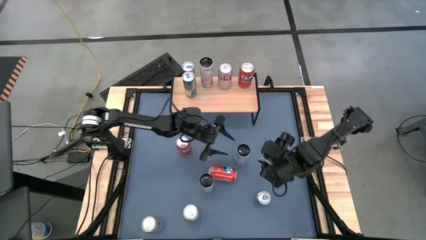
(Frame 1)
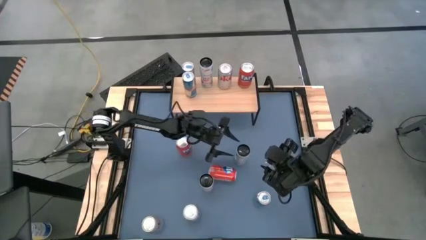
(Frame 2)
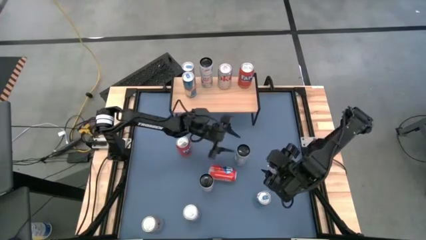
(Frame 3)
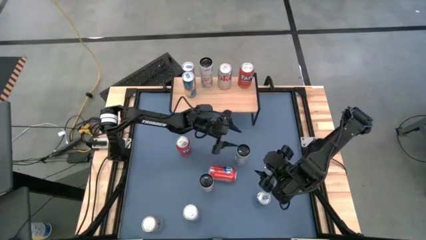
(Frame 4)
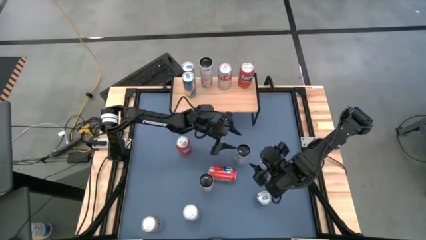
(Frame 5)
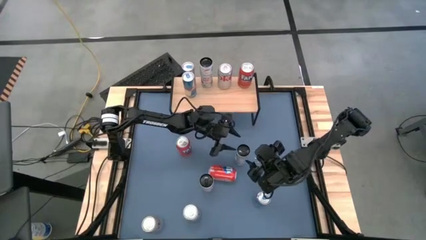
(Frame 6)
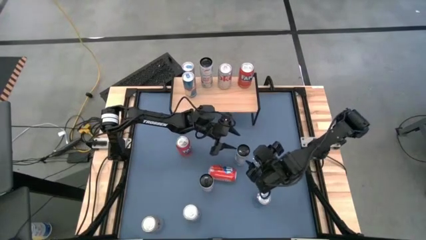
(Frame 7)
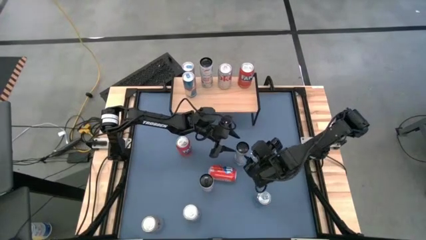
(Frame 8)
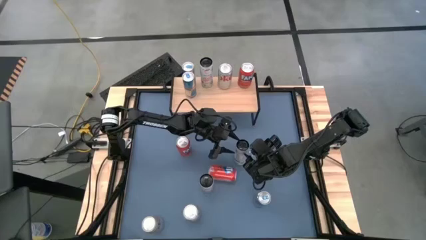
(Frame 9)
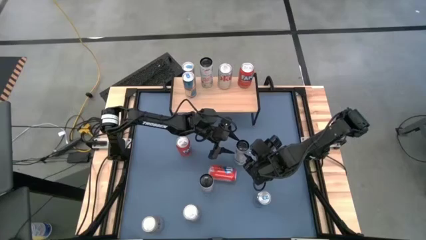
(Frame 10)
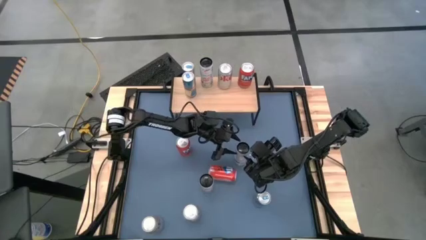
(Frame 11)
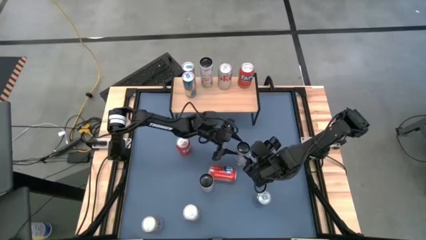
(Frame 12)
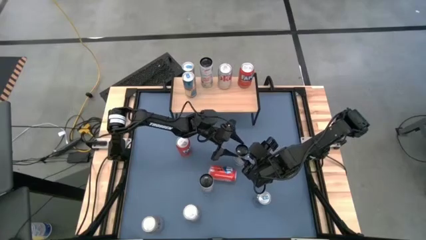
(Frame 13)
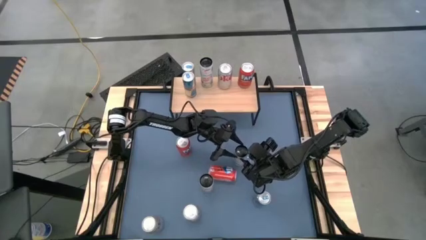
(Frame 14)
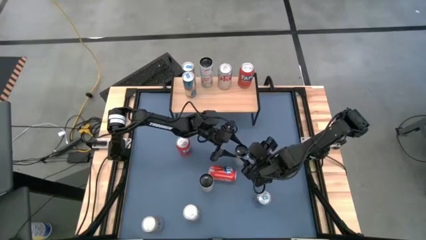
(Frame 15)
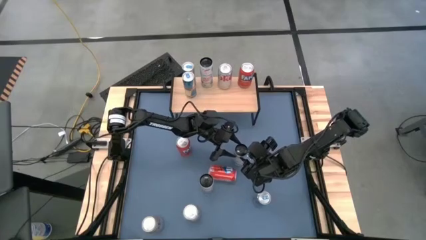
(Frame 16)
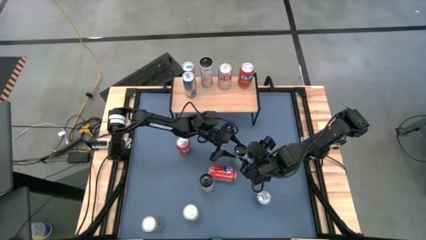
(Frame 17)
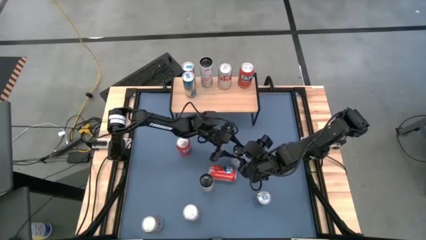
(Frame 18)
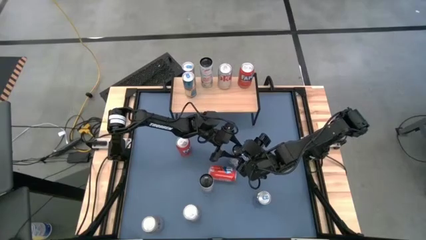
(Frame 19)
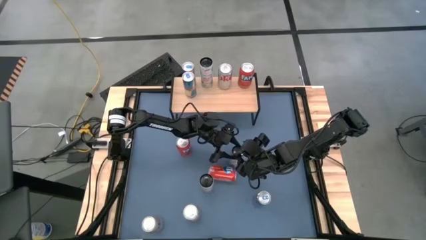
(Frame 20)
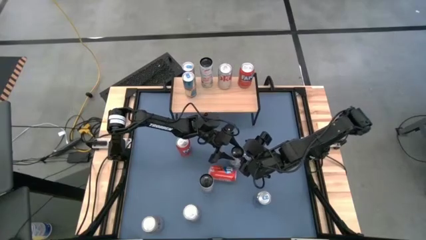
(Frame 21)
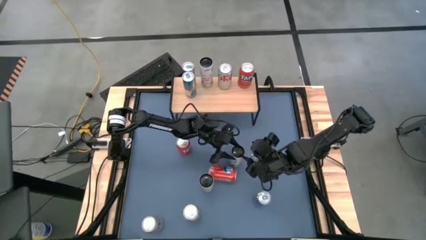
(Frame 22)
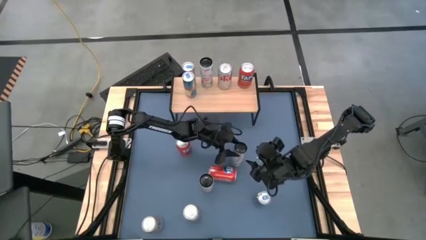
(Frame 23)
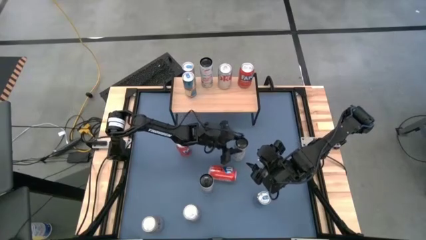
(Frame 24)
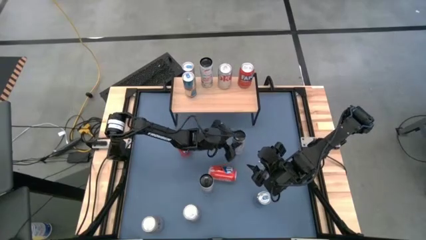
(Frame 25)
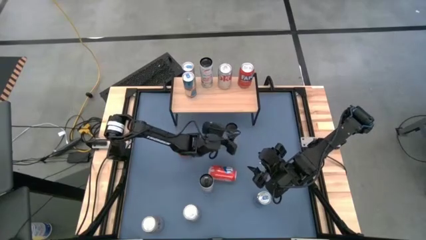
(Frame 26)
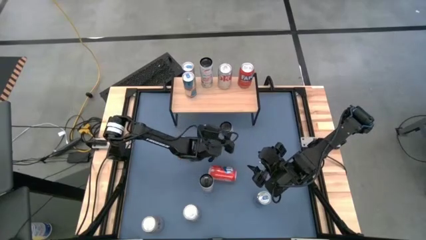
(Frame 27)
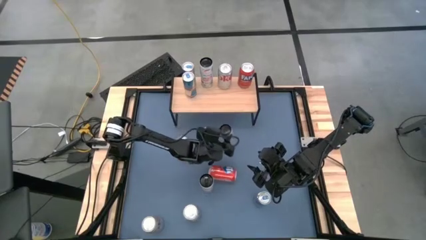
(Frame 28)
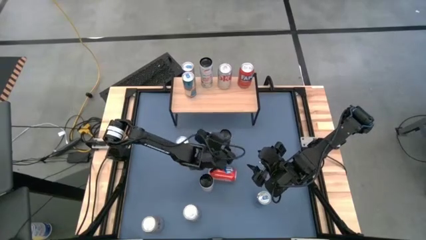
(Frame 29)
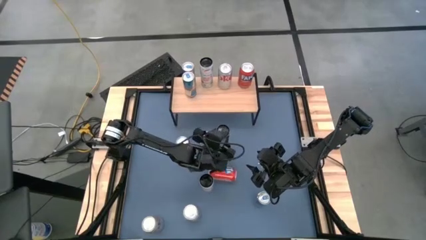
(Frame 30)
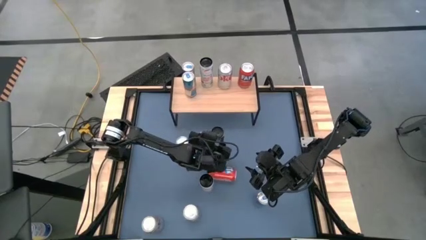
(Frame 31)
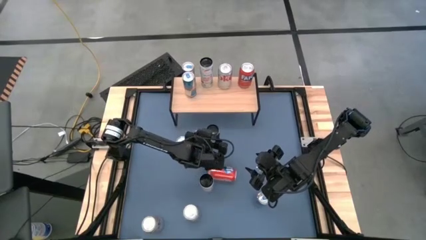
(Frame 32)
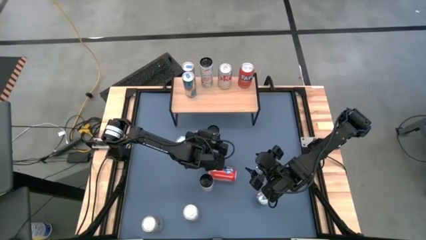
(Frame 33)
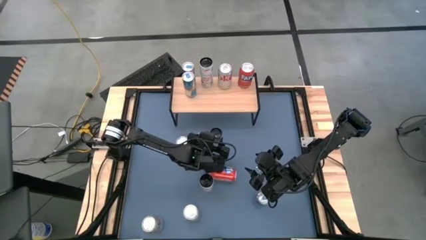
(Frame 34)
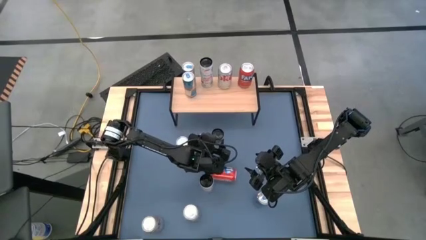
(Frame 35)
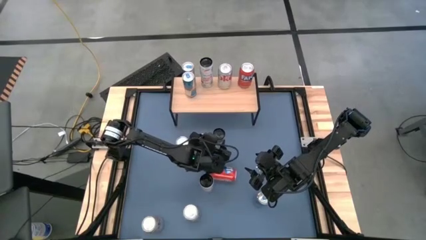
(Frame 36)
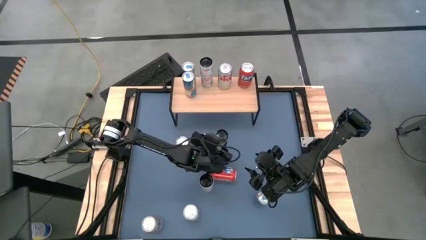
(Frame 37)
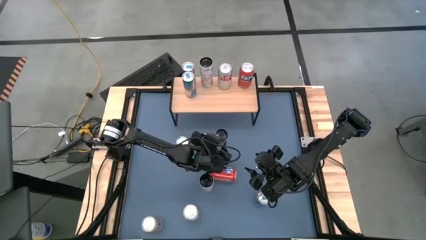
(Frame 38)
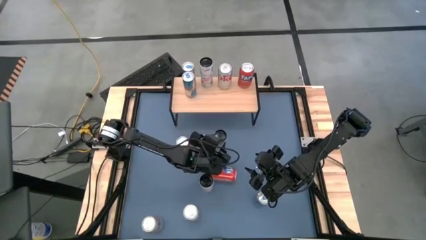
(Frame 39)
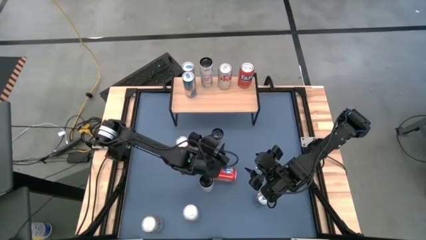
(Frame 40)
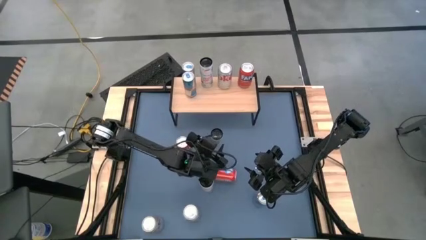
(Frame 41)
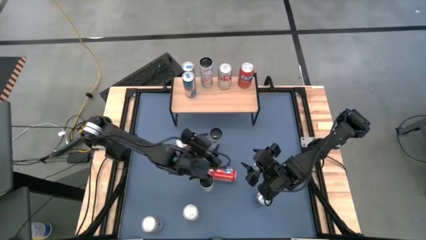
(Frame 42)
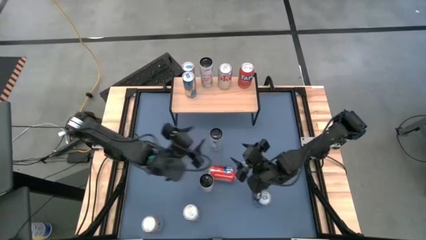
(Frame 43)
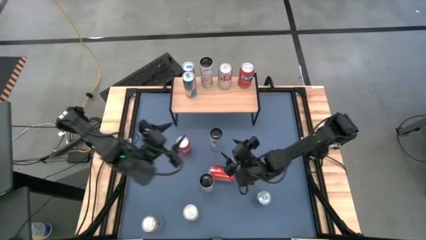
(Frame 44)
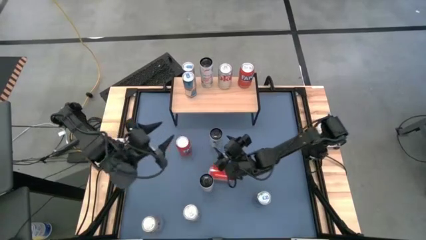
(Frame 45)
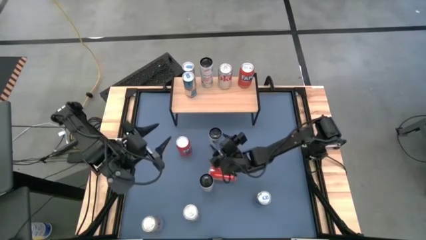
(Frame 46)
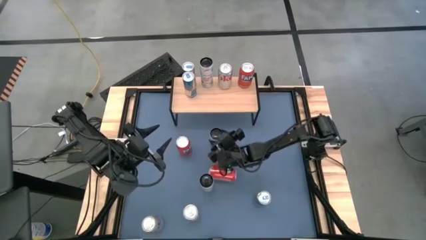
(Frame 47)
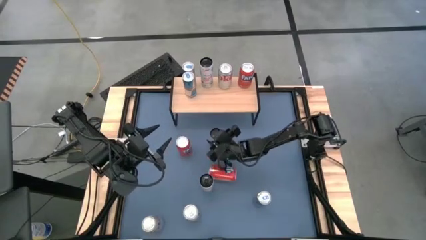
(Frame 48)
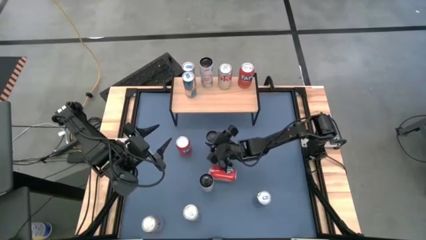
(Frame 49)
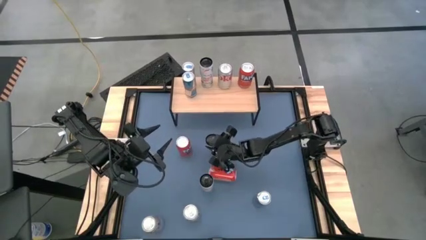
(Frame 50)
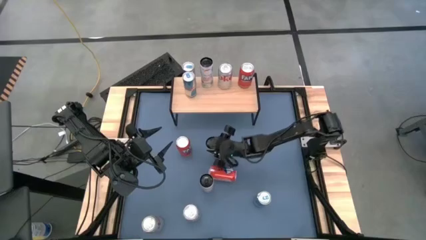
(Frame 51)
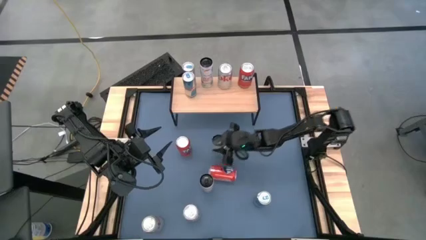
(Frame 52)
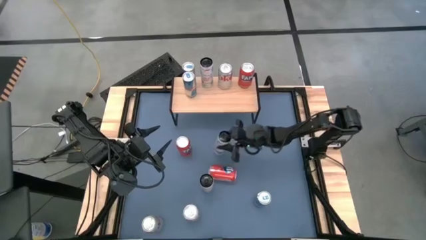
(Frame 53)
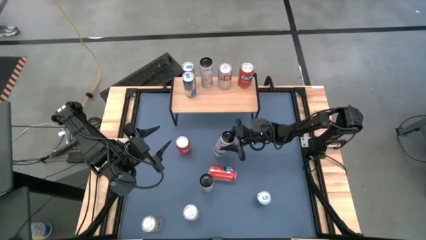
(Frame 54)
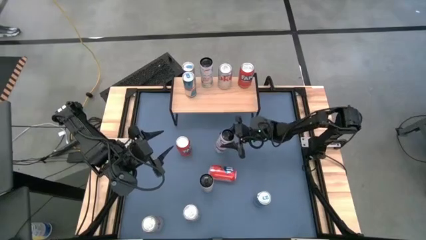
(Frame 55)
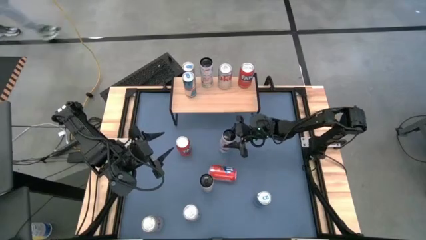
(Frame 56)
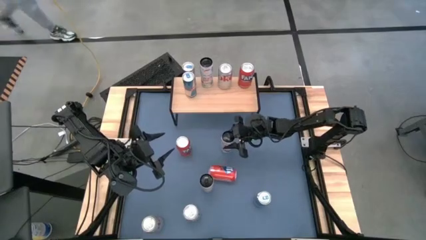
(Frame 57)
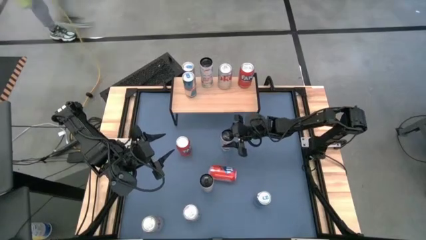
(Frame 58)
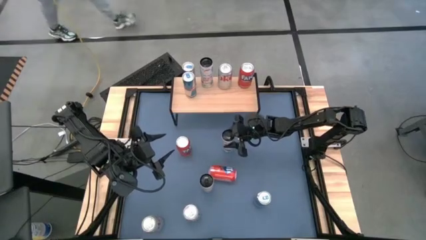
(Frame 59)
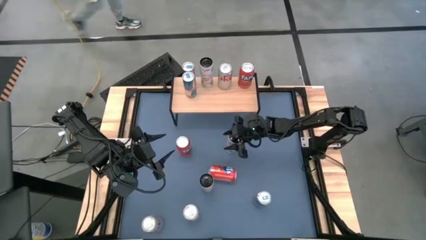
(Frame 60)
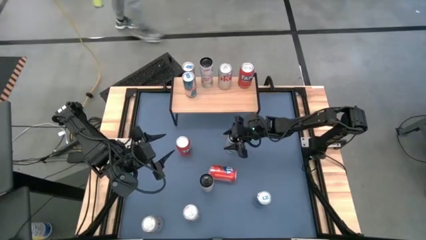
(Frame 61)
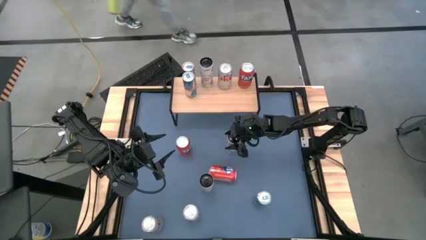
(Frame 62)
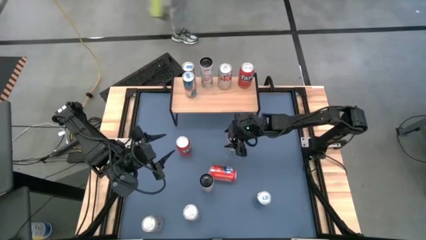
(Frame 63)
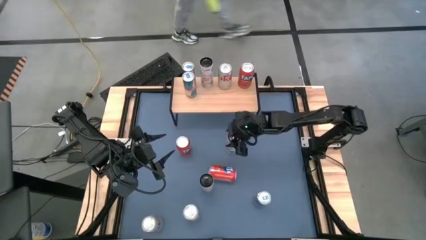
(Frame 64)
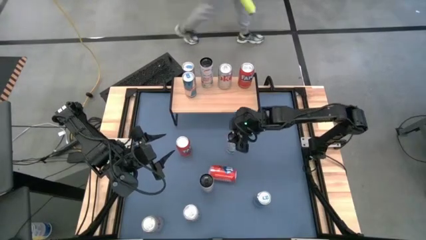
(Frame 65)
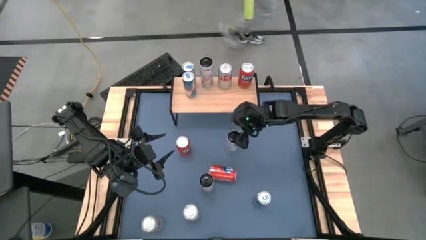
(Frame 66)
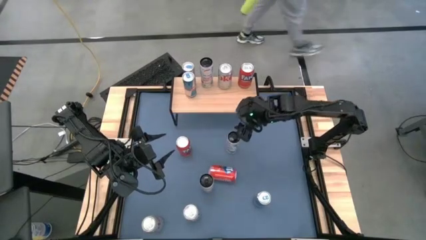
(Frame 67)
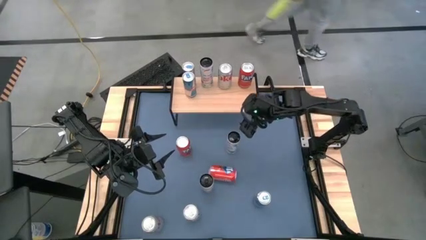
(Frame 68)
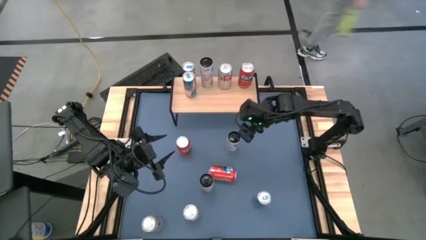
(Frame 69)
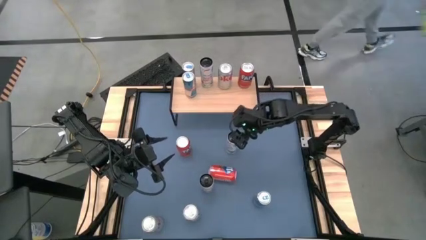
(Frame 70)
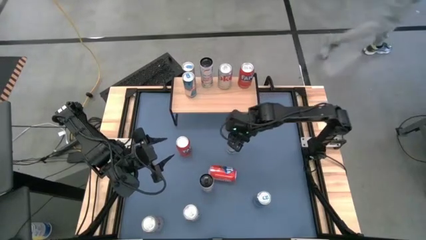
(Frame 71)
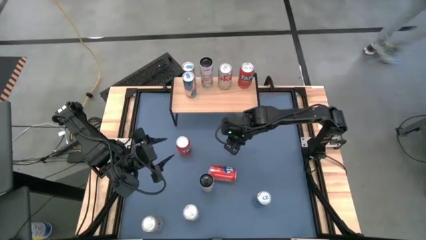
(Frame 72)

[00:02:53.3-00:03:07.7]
Task: Place canned beverage on shelf
Put the top right pink soda can on the shelf aligned with the other pink soda can
